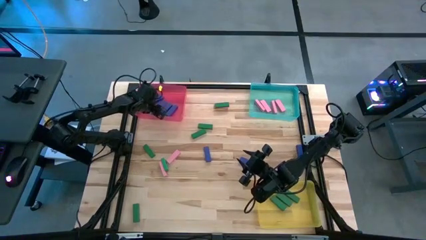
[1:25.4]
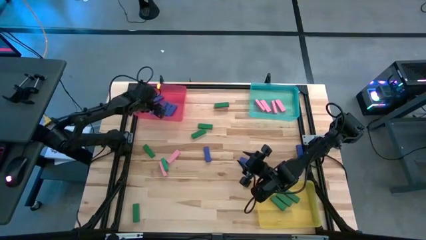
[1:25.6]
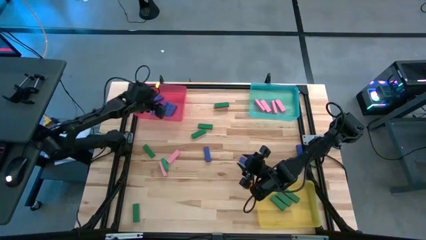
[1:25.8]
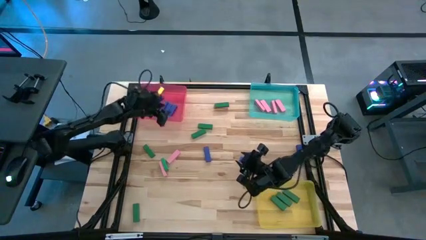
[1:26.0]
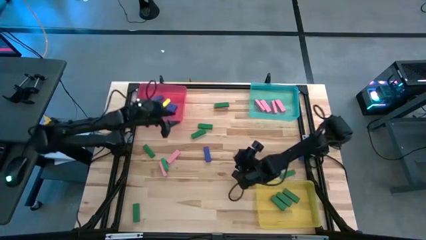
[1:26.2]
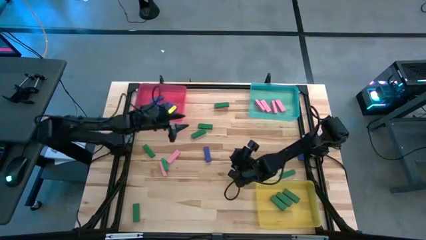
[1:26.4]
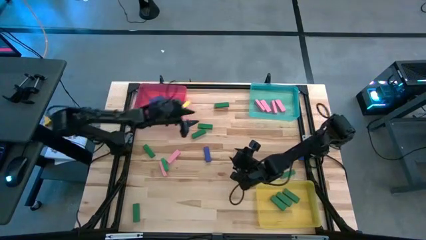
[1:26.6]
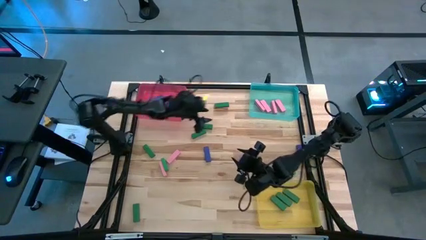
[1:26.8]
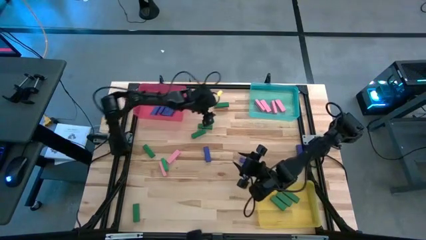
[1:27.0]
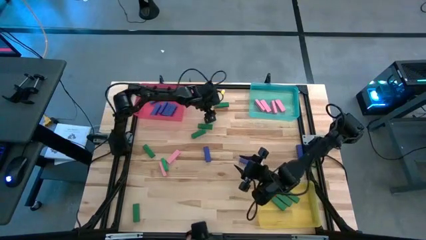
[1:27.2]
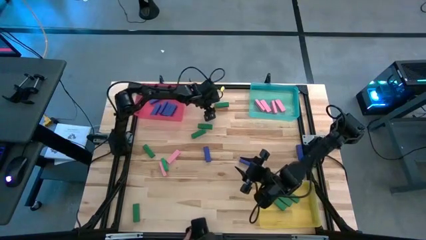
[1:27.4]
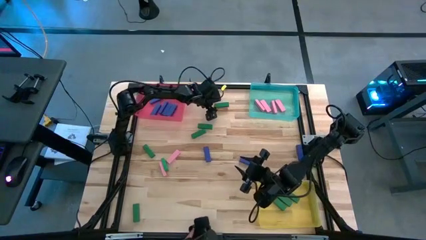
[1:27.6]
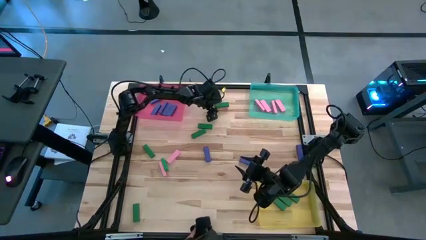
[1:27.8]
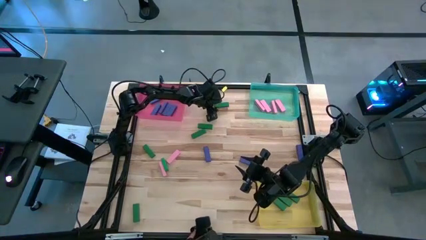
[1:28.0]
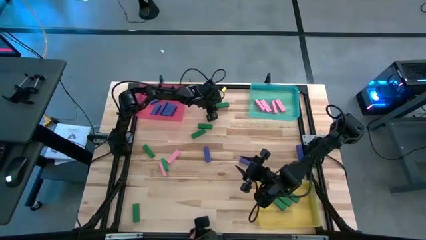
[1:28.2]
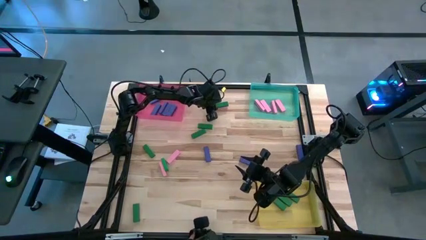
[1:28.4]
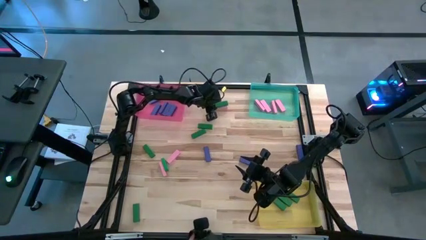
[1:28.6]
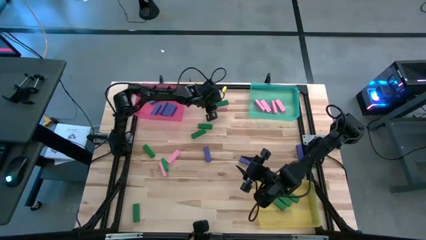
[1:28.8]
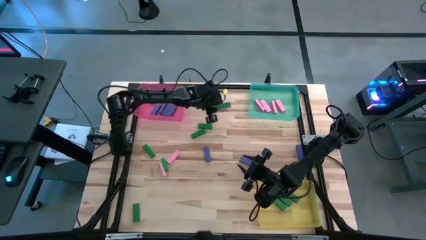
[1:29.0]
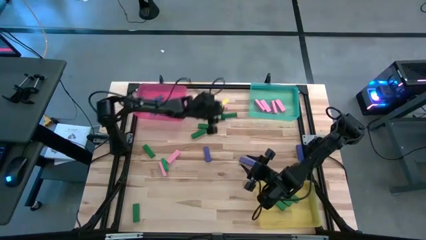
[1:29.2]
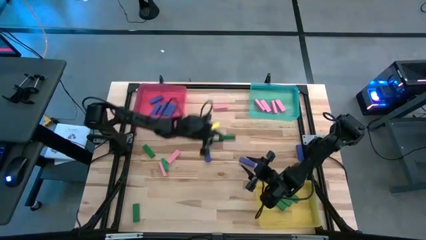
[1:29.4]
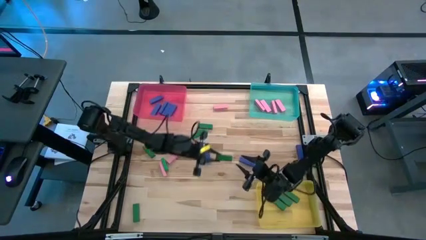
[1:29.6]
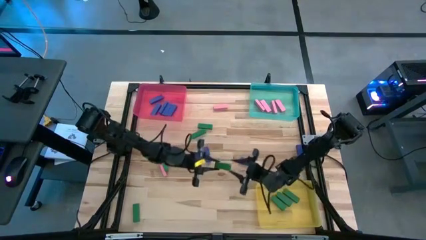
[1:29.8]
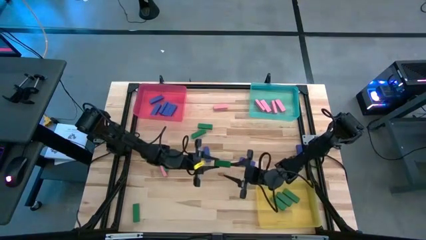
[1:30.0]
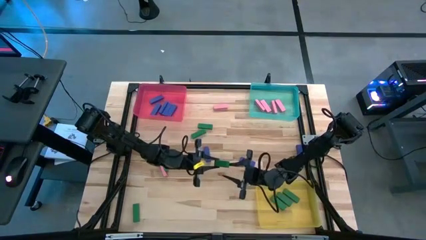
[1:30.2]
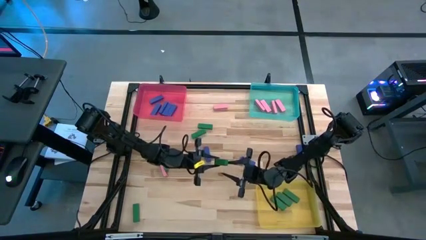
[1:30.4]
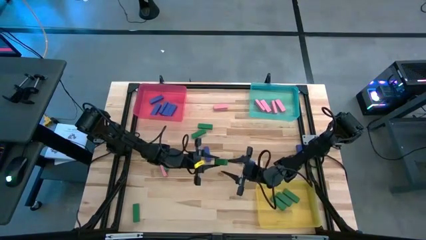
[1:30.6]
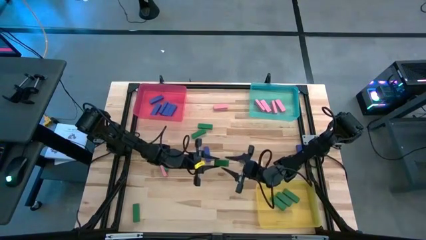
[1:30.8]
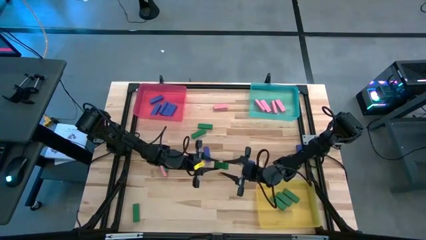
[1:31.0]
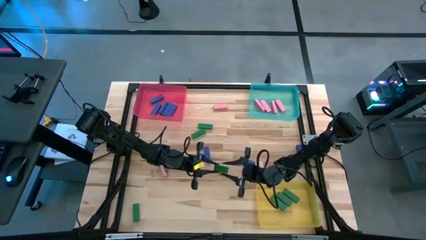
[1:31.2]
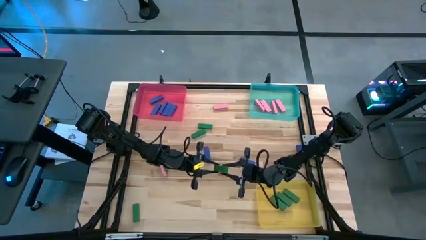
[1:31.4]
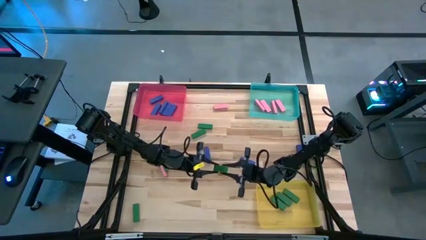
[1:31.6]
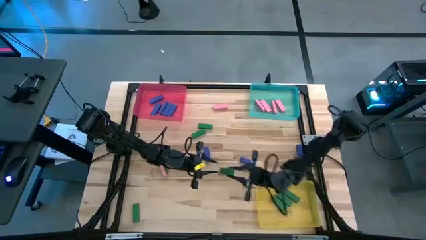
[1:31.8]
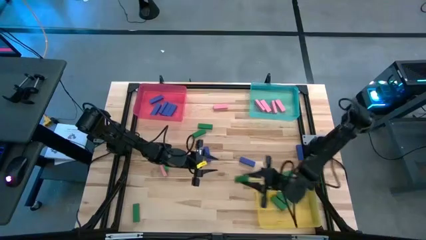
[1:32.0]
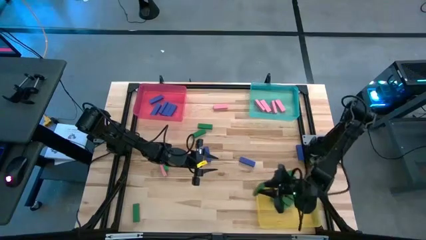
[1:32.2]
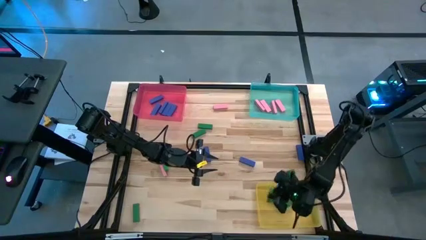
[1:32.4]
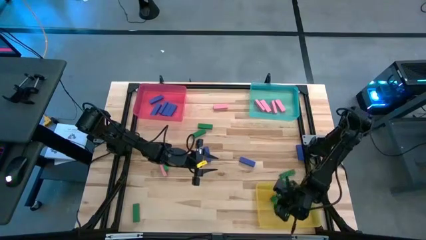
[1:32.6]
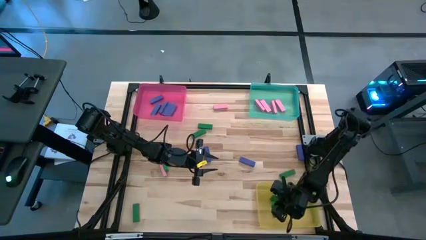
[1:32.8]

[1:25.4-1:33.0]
Task: Sort blocks
Put the green block into the yellow bin

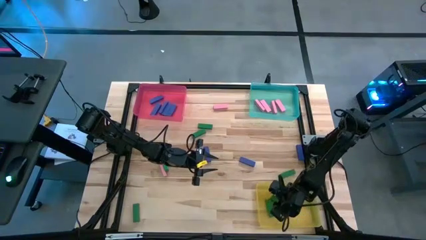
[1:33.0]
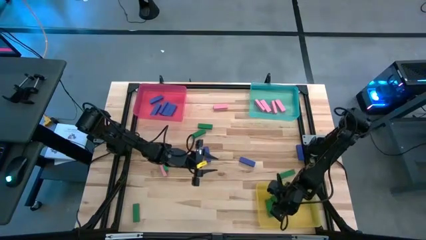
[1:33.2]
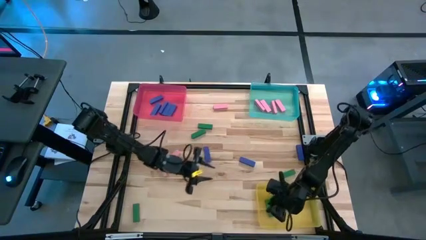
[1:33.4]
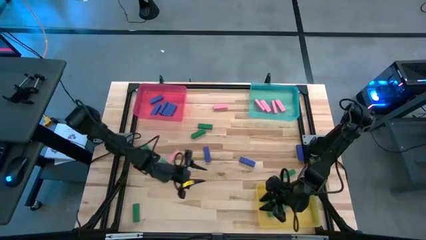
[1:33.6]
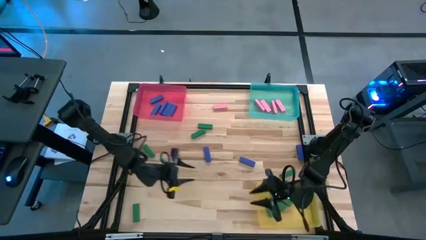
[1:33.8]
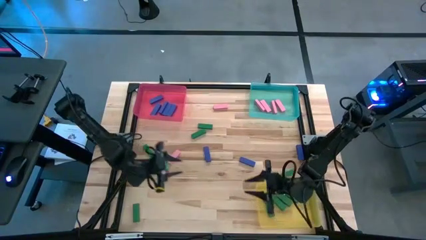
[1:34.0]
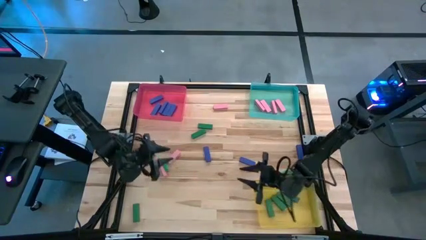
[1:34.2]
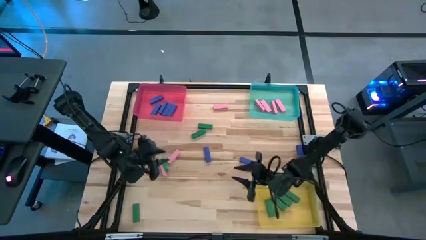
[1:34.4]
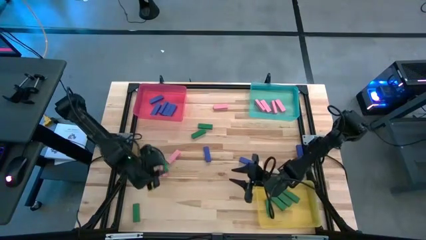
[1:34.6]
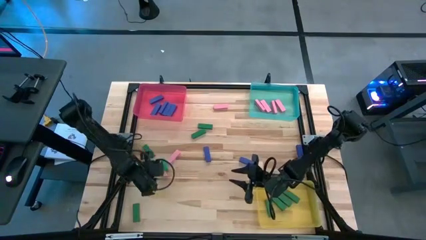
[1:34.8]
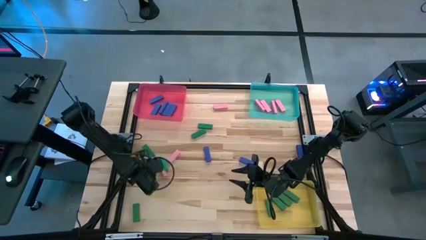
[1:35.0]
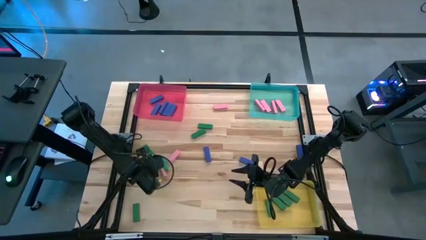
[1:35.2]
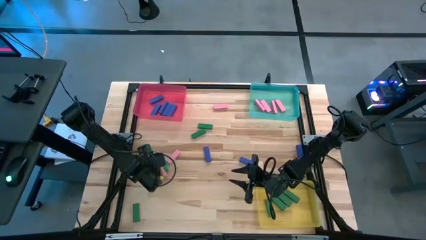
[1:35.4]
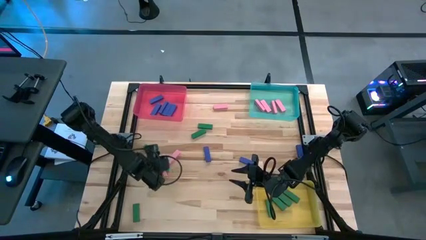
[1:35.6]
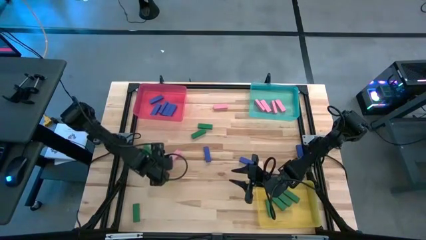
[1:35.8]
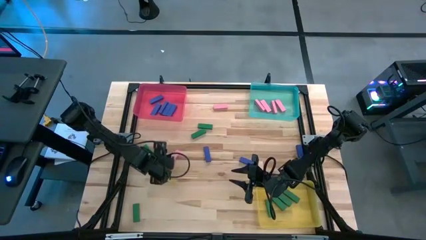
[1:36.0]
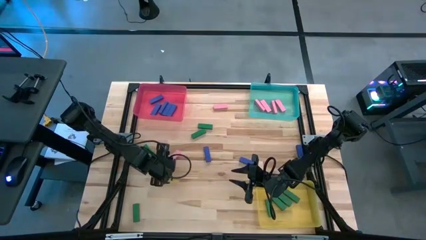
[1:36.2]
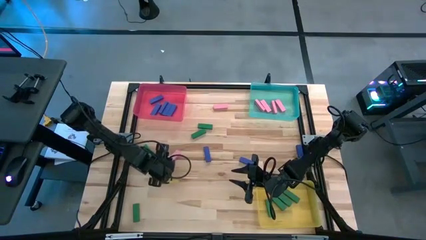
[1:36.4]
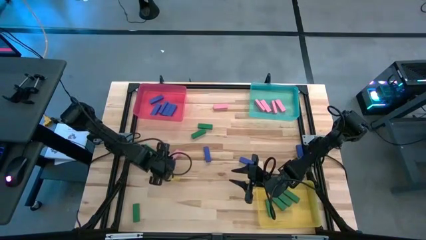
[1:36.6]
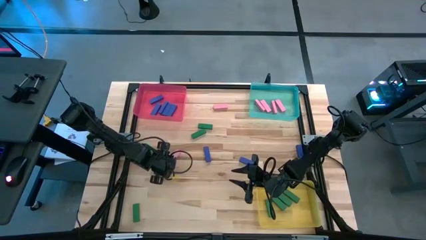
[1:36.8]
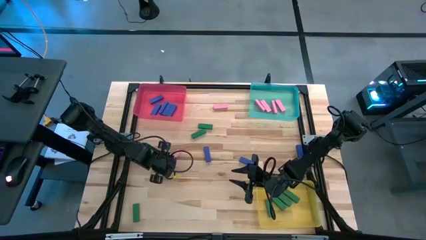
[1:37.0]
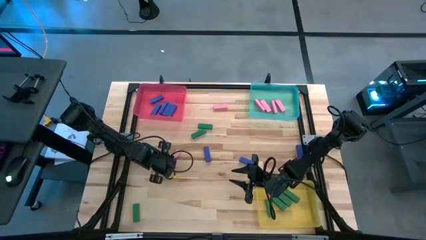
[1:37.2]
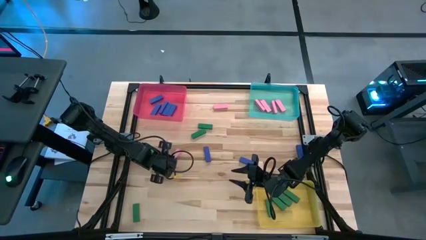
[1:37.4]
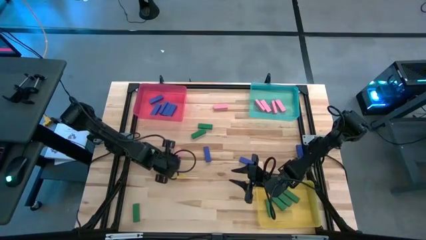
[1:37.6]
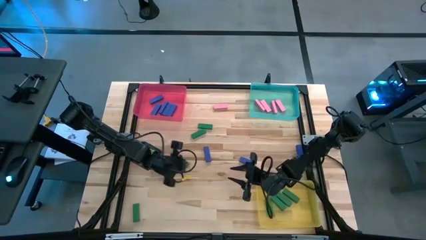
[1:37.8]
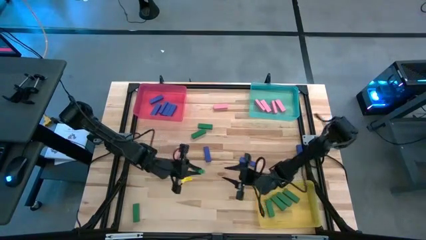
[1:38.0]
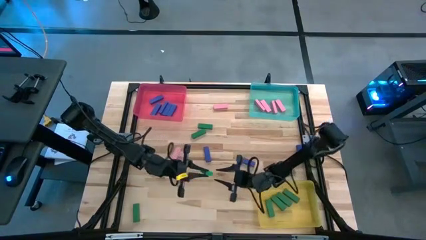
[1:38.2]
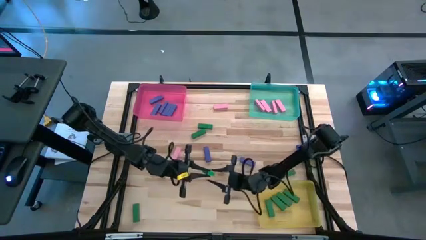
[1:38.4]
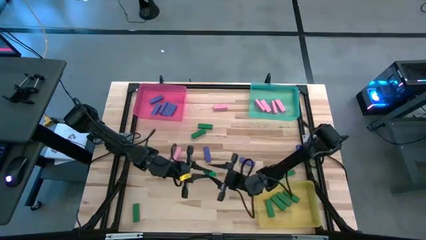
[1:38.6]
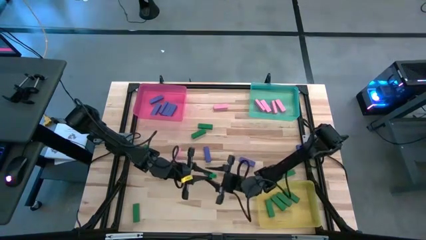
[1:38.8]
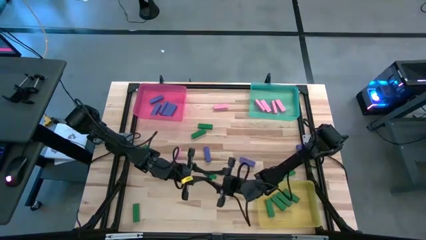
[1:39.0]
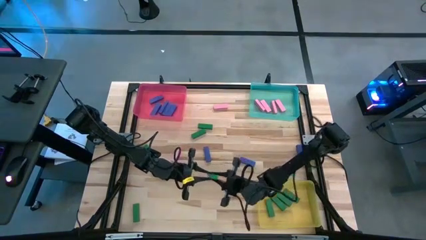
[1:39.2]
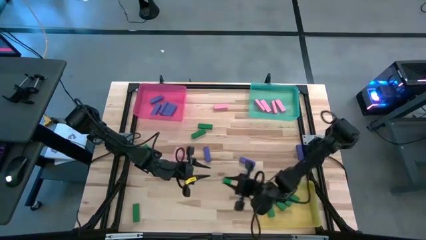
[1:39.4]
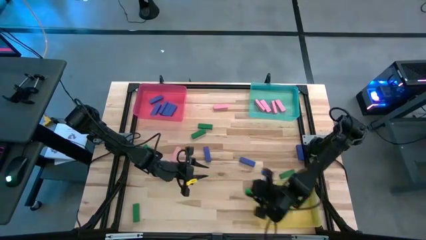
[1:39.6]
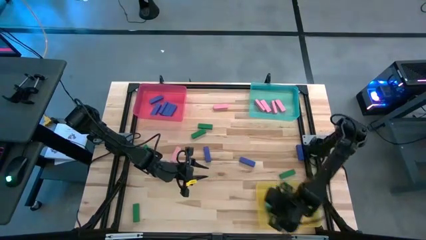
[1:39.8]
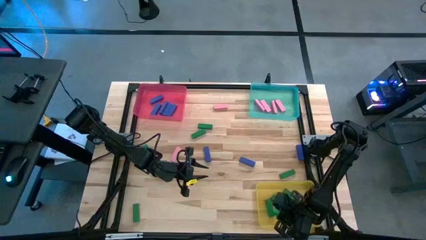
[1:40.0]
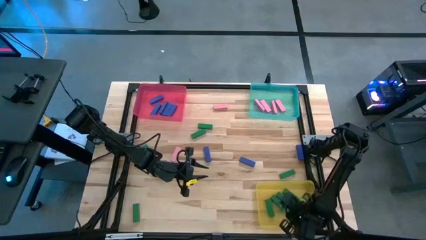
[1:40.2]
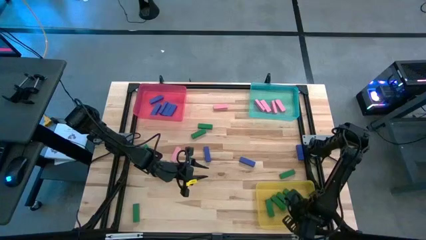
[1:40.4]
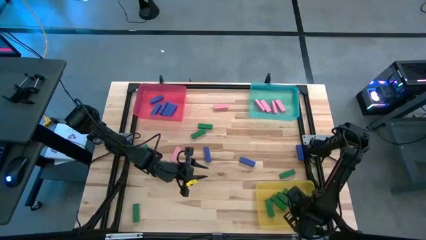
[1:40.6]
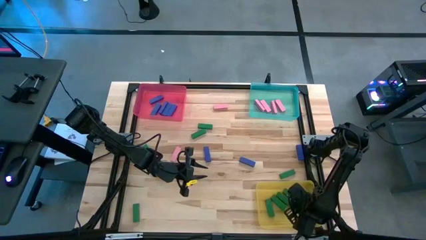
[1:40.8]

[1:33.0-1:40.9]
Put the green block into the yellow bin

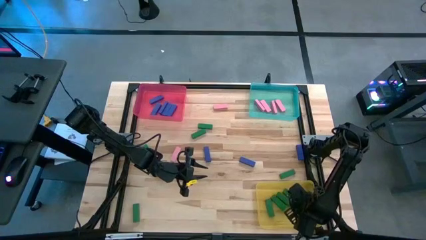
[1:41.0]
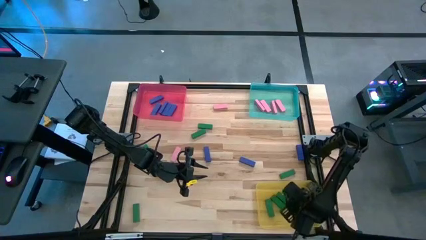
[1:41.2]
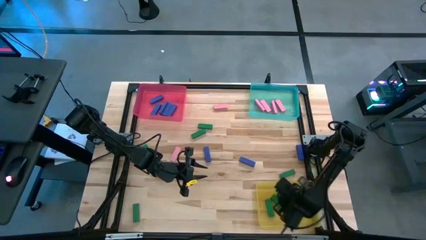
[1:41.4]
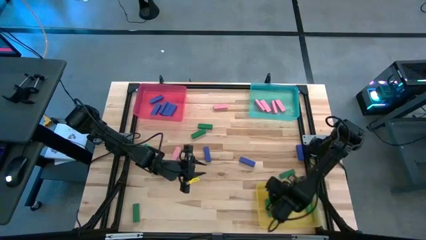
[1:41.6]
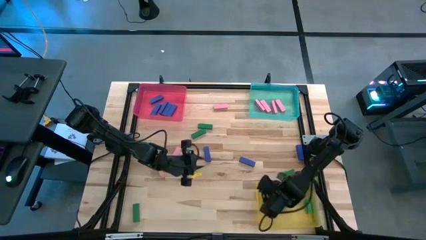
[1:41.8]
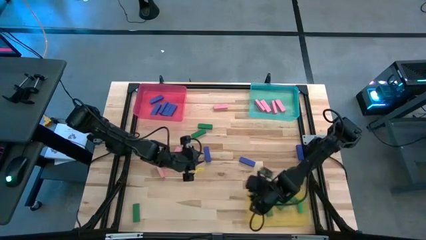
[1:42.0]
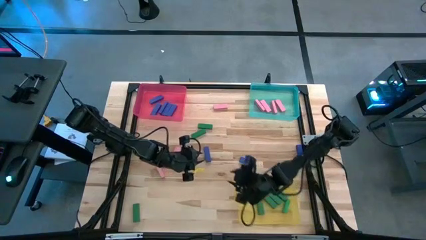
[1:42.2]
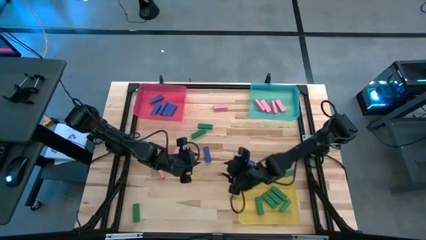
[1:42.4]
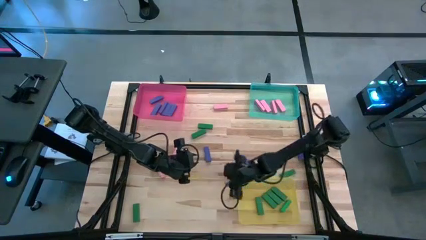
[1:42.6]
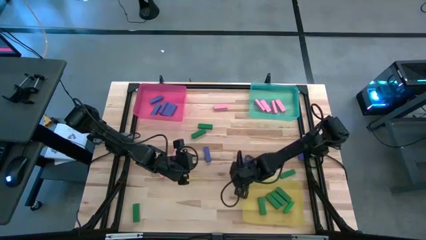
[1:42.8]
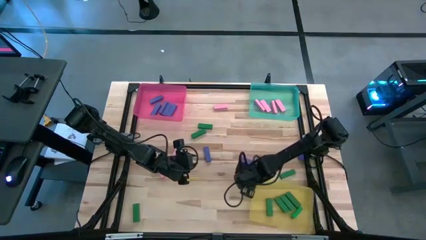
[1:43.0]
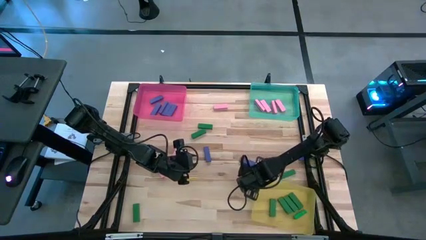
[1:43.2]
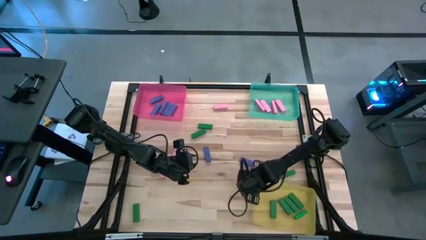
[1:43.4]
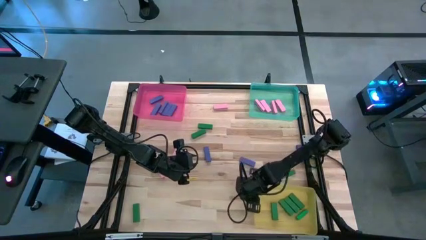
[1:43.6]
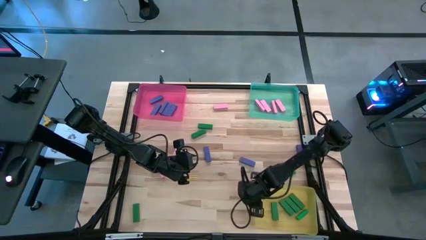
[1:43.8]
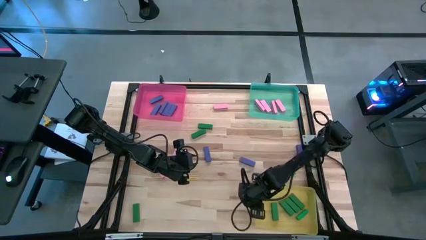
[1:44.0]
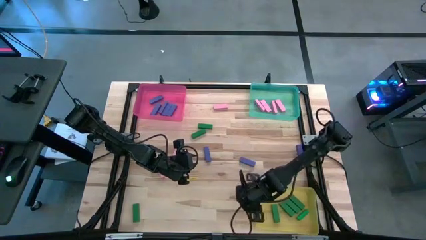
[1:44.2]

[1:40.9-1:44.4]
Adjust the yellow bin
